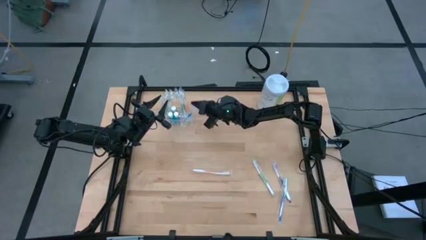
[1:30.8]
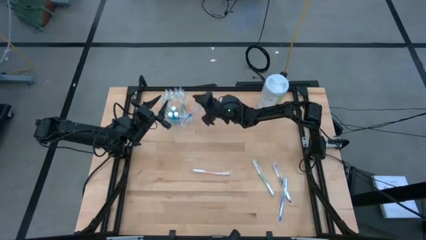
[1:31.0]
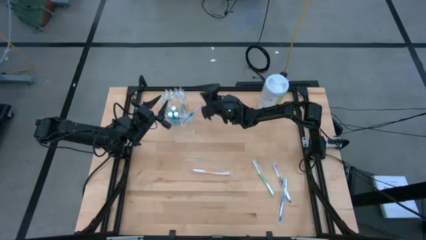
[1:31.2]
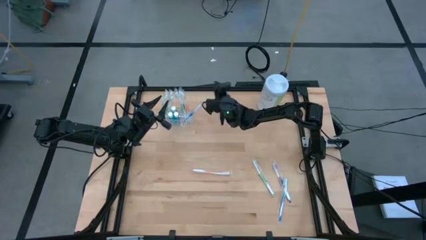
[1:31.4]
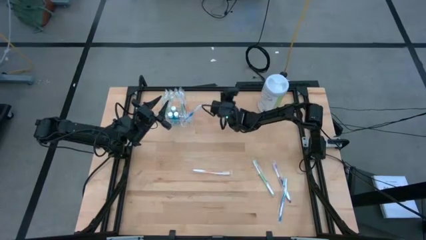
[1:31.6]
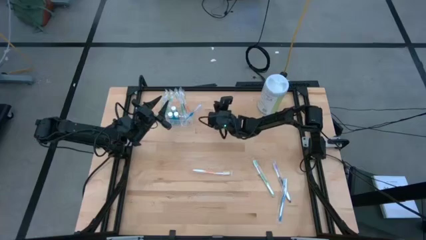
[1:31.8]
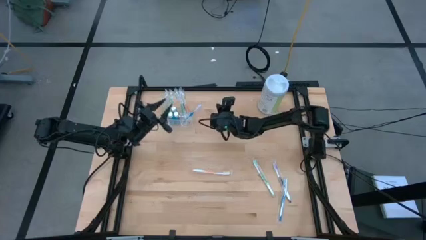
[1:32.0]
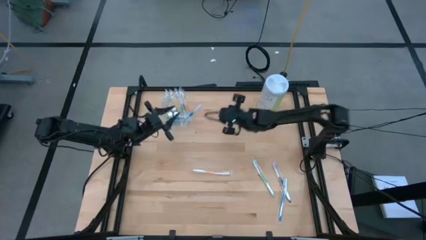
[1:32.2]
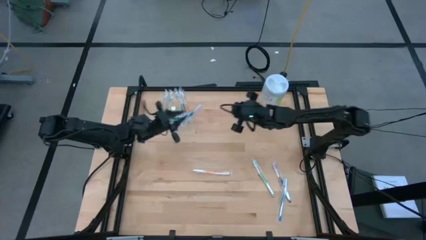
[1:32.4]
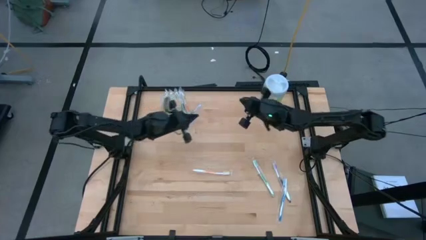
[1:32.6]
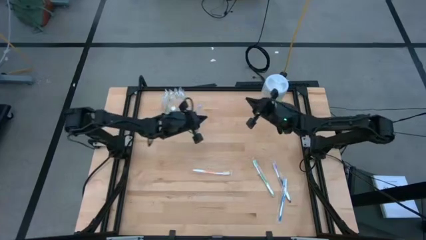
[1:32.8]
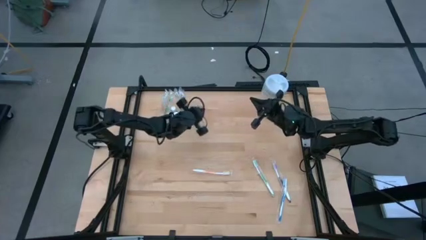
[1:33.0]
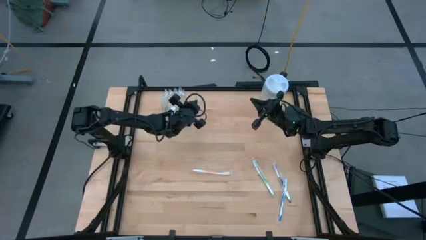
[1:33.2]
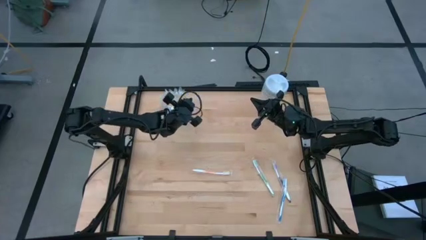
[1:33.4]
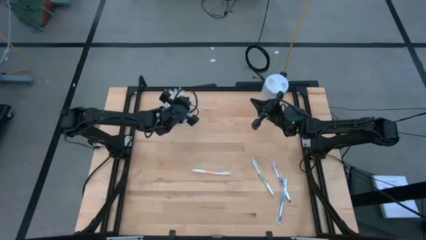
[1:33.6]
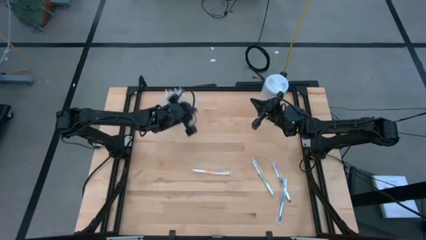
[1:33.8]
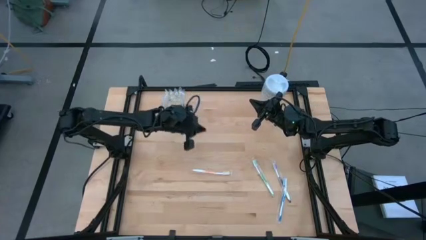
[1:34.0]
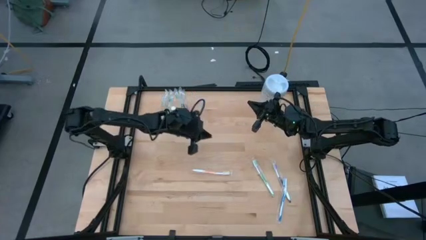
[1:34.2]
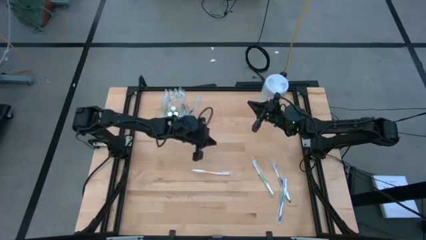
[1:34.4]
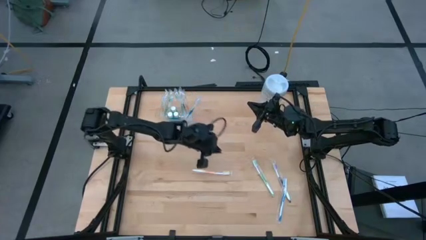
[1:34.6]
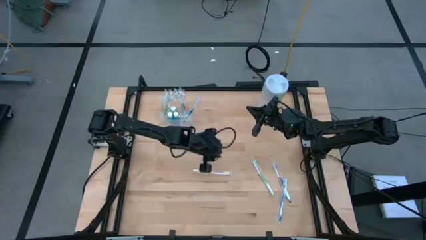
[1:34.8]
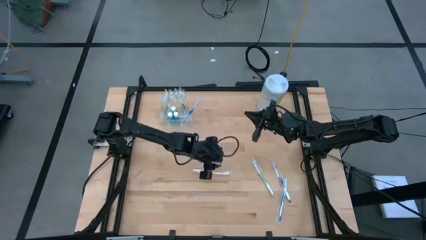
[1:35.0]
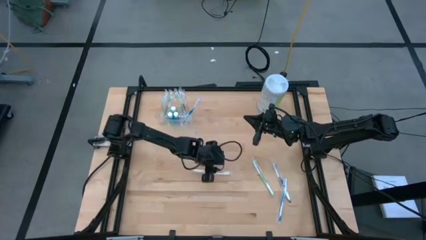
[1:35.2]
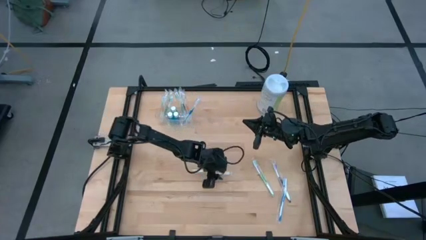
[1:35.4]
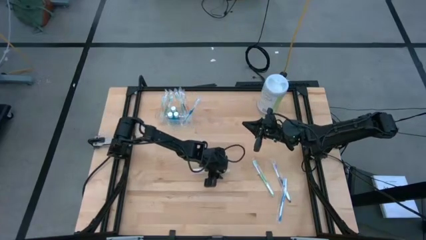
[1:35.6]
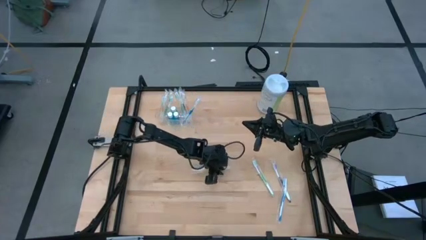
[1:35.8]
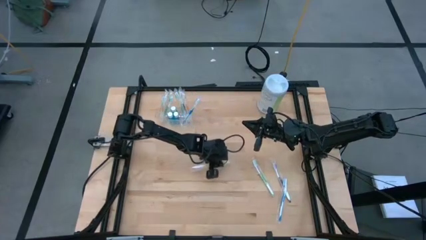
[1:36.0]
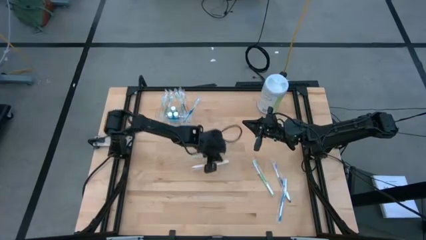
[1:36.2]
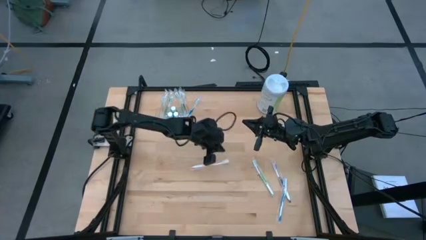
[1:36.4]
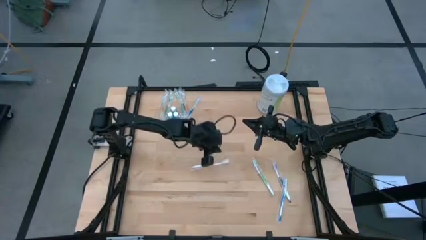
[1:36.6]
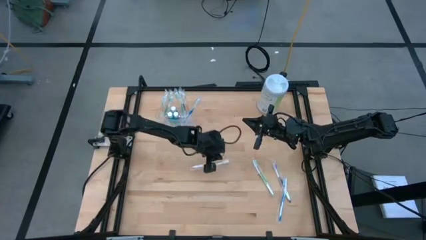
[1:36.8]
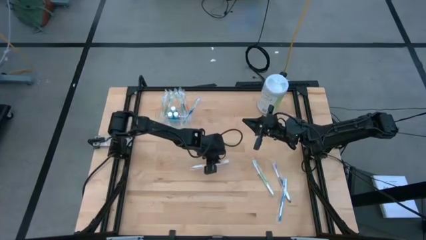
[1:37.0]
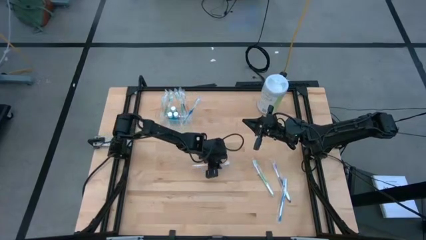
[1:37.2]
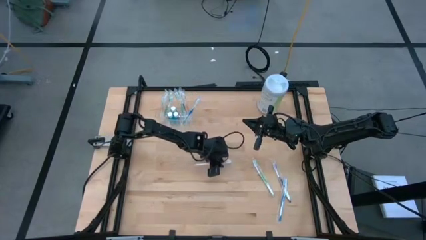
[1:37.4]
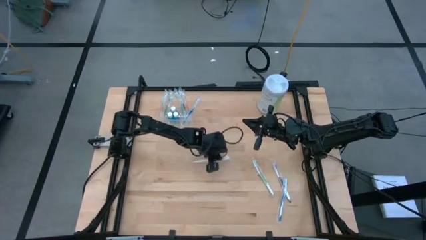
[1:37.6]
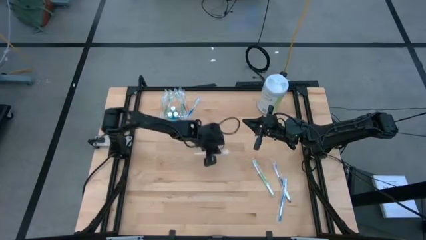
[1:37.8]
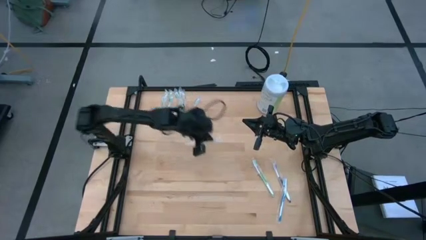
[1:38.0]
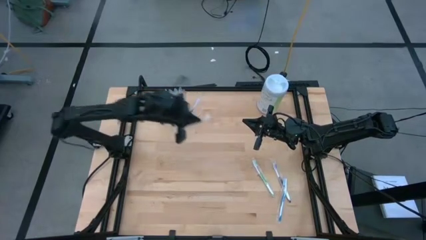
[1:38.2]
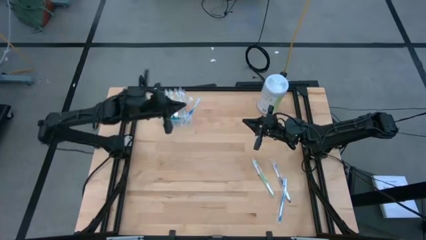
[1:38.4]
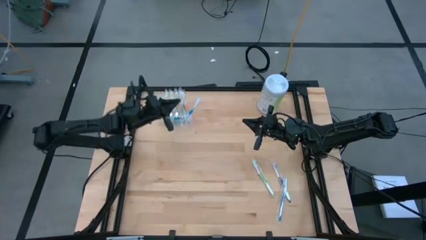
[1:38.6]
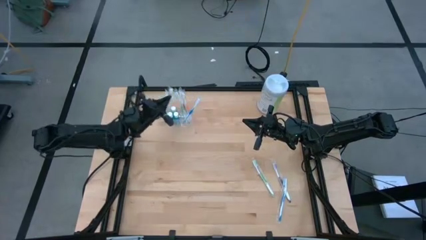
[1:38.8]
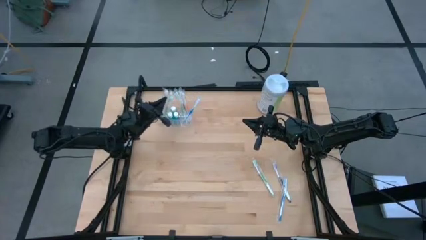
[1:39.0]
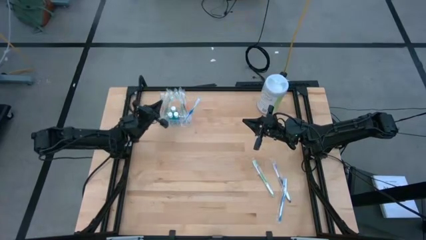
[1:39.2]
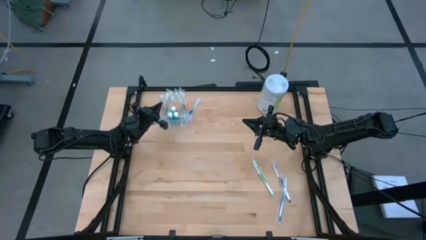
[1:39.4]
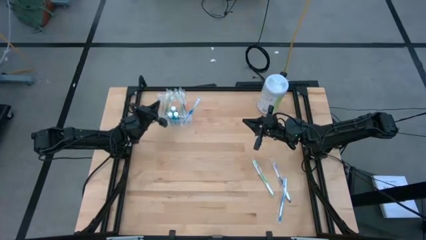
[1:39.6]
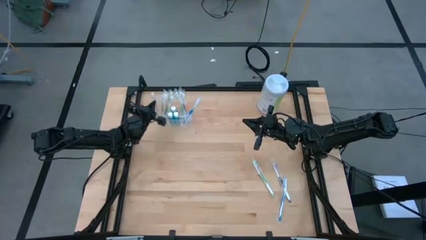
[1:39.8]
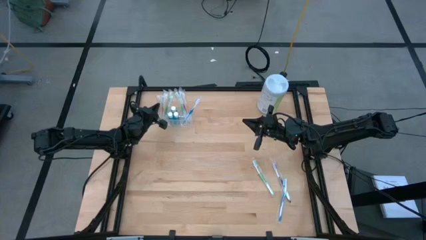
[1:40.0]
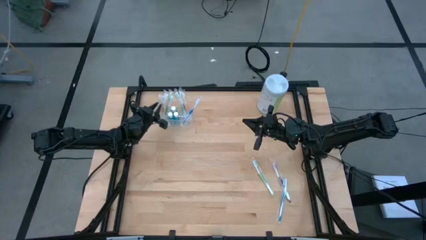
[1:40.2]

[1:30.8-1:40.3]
Task: Pick & Place toothbrushing station
Put the orange toothbrush into the transparent organizer

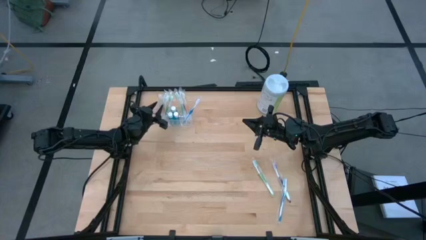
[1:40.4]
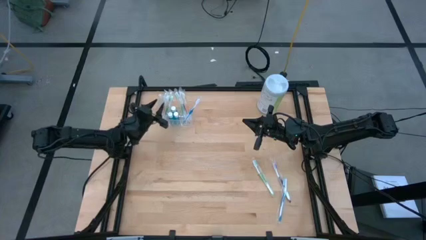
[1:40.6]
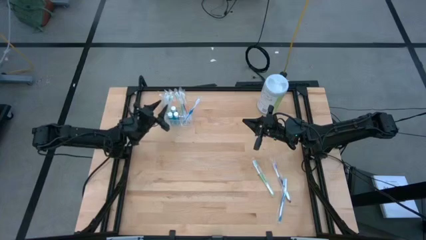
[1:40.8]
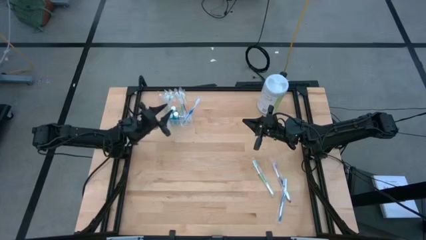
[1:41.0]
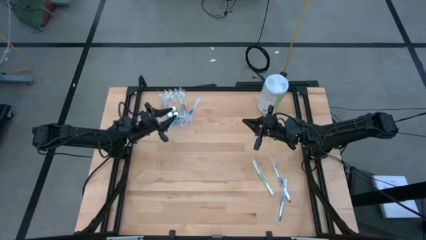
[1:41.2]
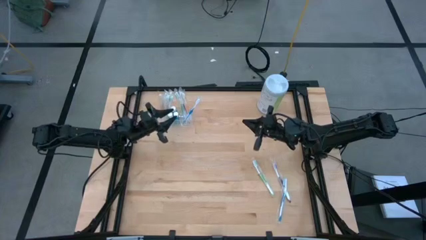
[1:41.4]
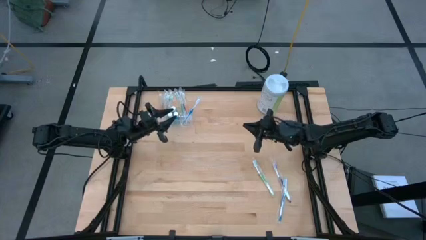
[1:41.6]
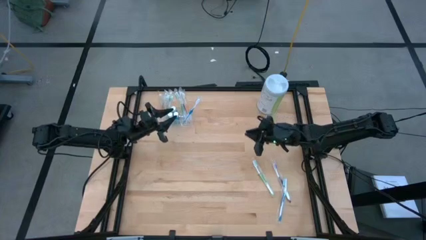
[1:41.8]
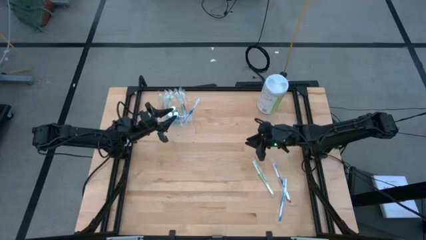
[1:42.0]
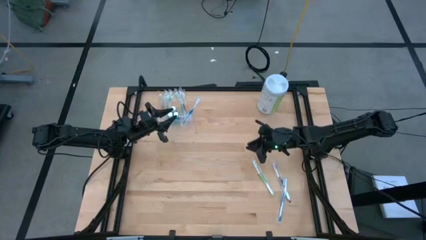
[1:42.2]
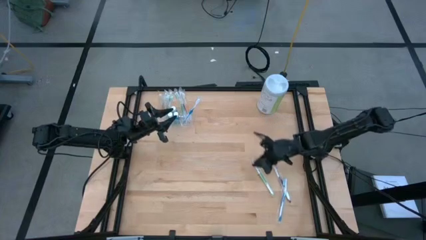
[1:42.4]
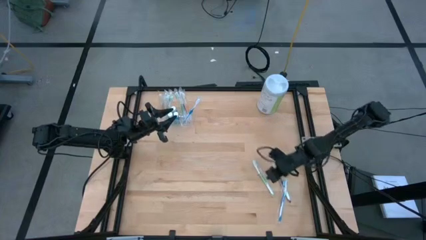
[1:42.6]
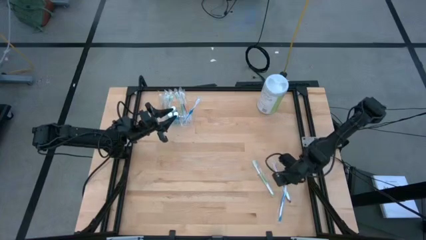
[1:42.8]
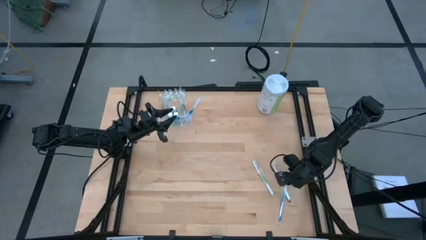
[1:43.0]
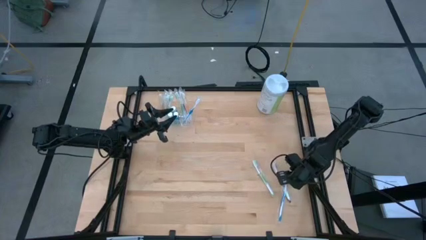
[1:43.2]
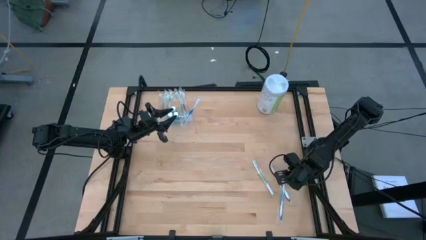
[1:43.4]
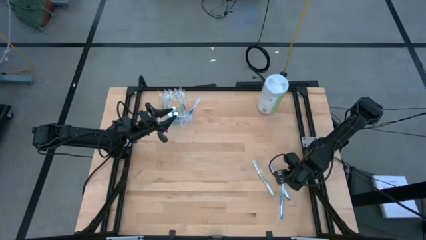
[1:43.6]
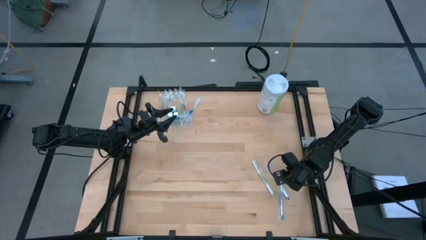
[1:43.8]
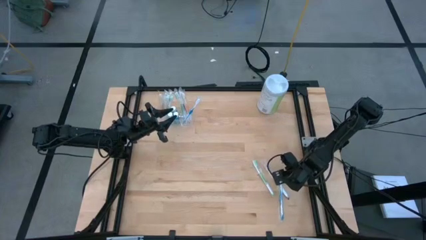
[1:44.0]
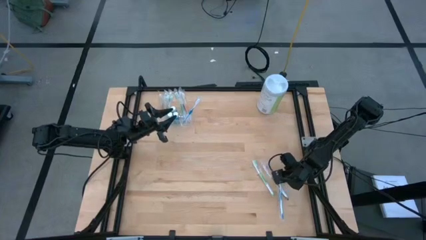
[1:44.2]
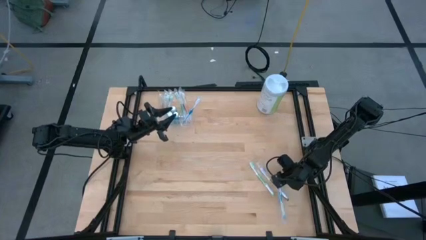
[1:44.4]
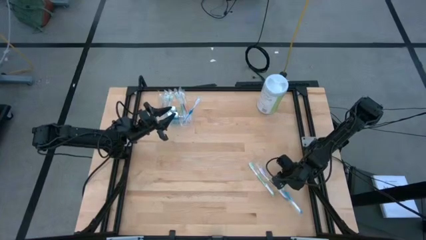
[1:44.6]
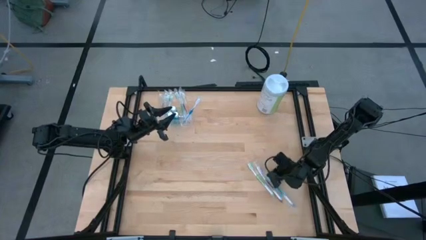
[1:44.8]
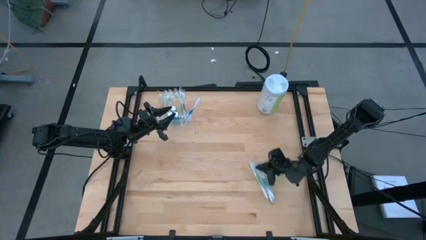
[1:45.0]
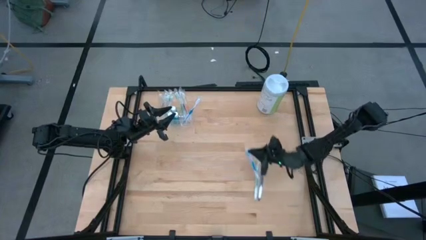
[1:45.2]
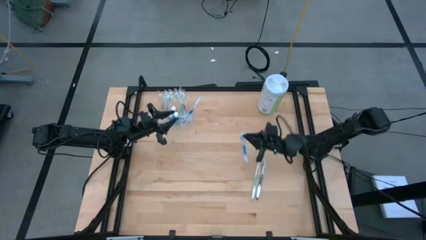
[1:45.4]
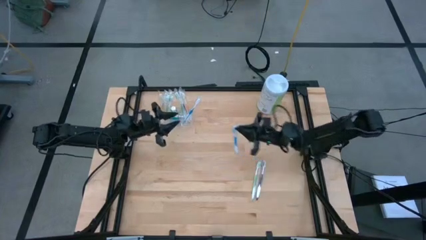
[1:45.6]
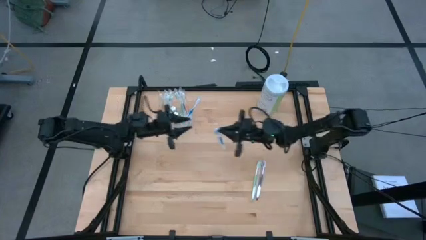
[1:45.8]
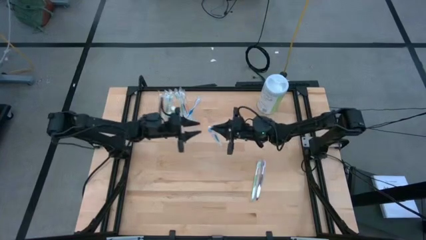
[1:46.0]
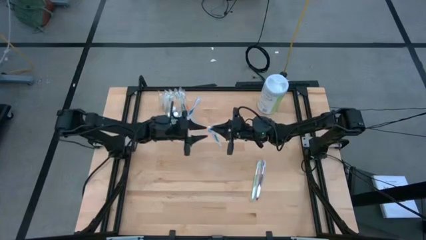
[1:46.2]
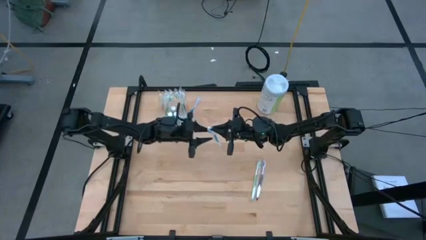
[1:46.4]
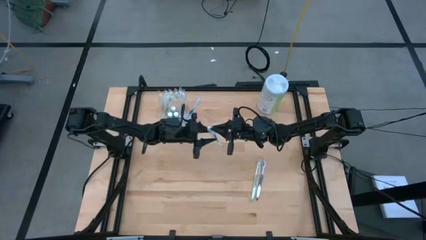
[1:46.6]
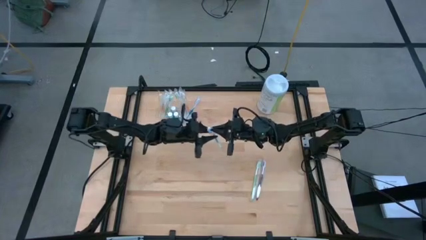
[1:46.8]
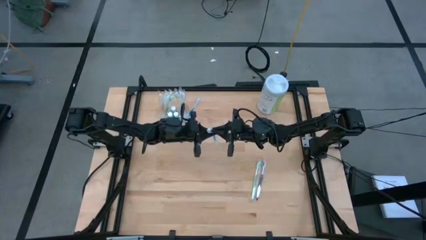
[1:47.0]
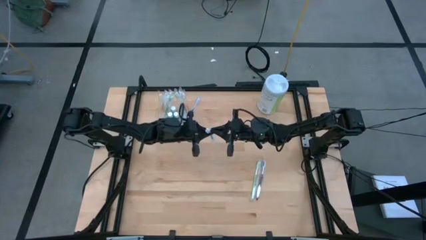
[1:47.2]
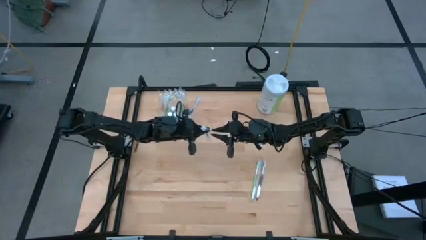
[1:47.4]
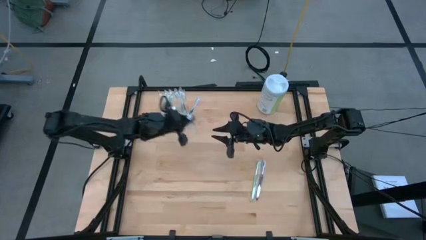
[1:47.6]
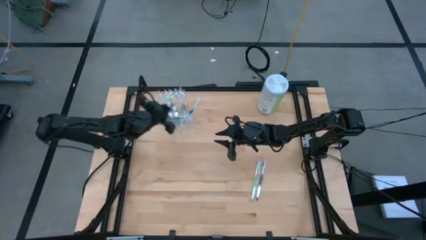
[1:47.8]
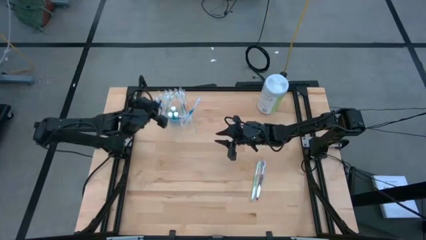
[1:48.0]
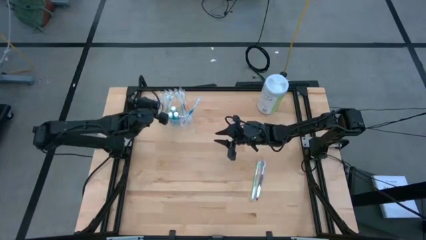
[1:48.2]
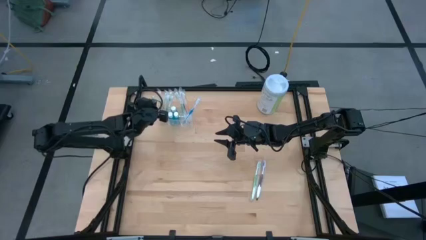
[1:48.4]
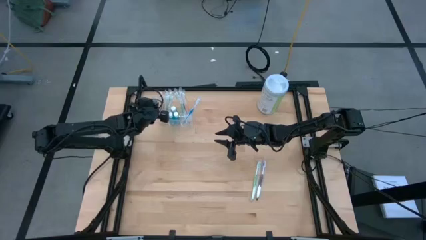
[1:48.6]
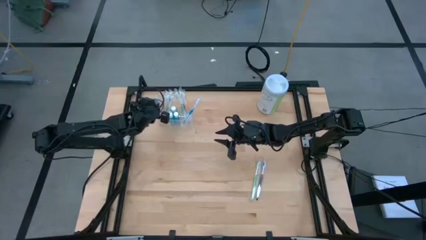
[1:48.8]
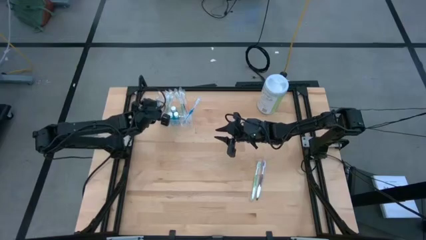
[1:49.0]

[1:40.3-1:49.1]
Put the blue toothbrush into the transparent organizer
